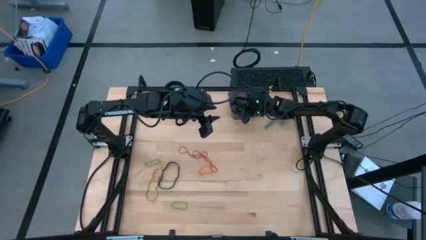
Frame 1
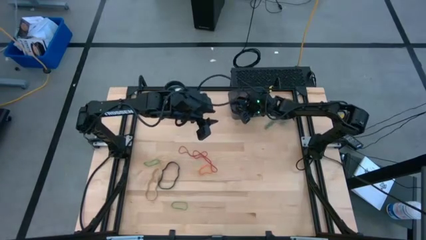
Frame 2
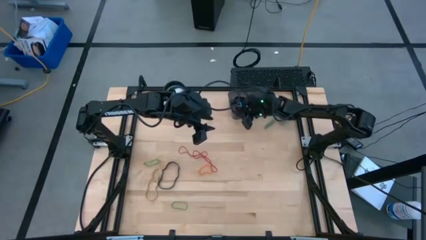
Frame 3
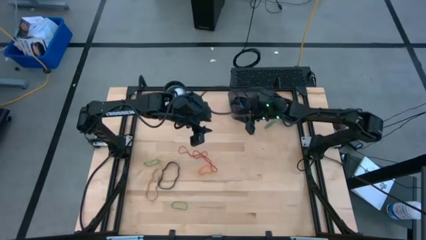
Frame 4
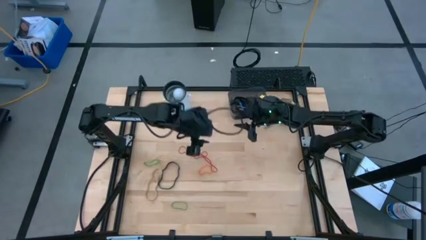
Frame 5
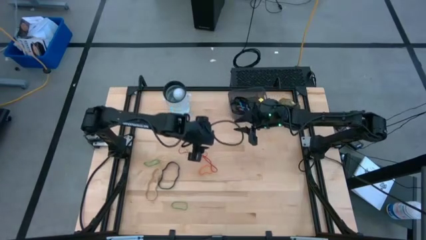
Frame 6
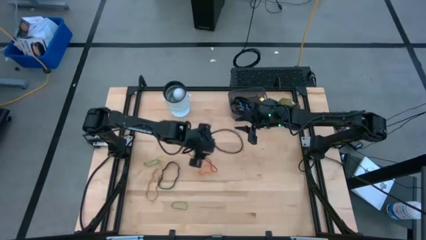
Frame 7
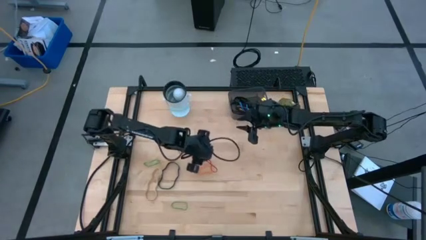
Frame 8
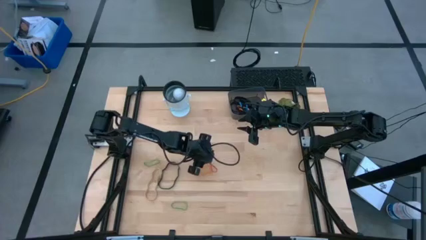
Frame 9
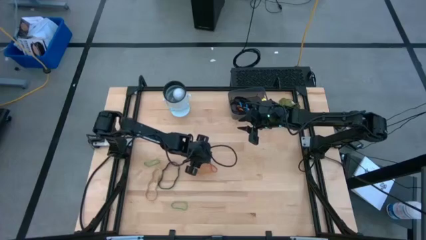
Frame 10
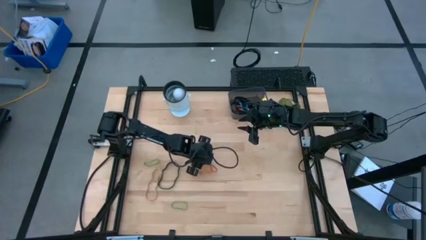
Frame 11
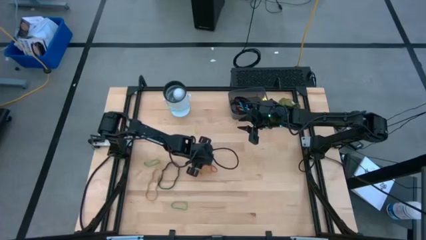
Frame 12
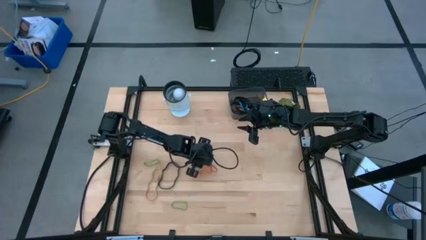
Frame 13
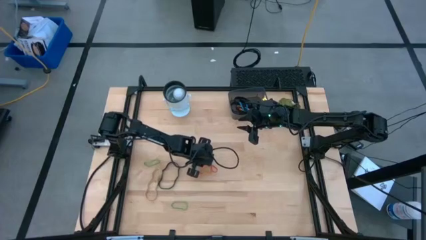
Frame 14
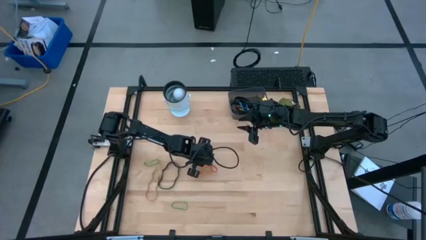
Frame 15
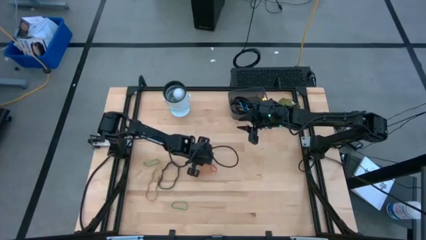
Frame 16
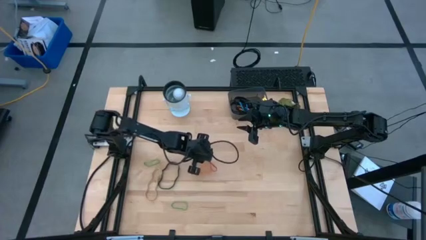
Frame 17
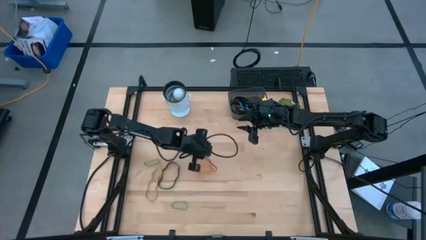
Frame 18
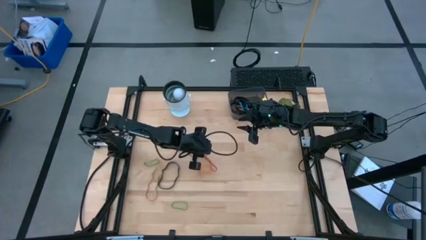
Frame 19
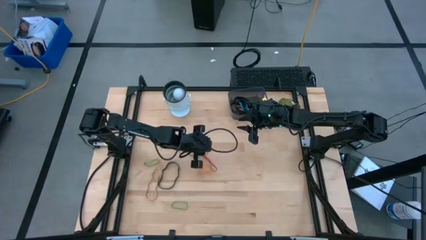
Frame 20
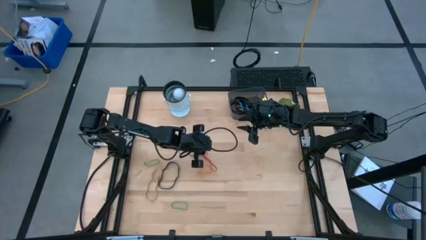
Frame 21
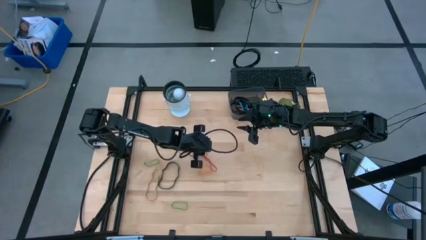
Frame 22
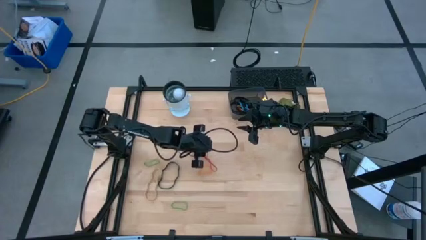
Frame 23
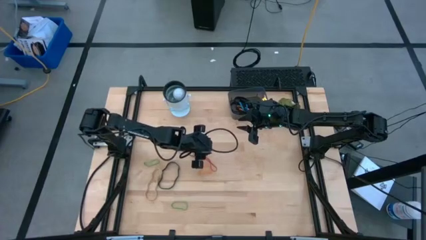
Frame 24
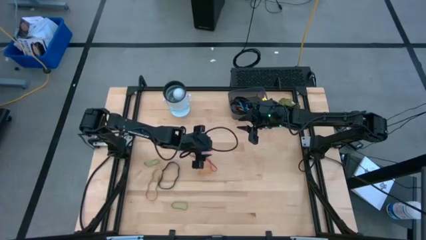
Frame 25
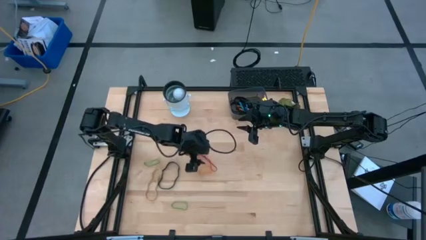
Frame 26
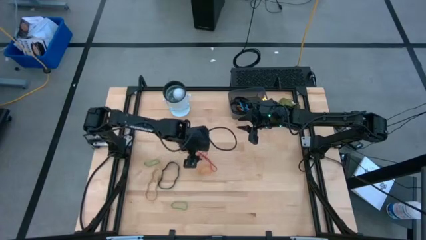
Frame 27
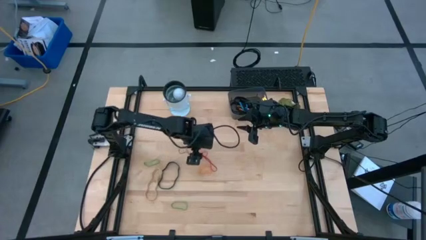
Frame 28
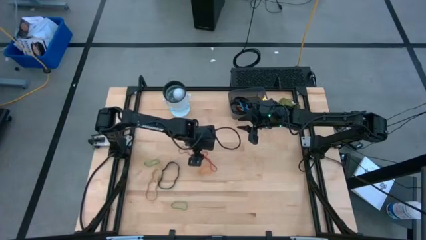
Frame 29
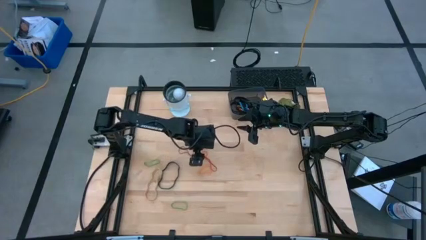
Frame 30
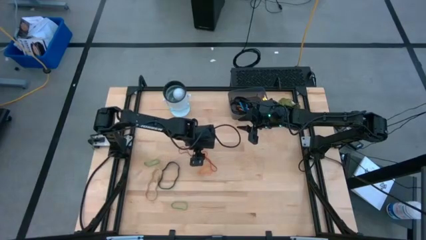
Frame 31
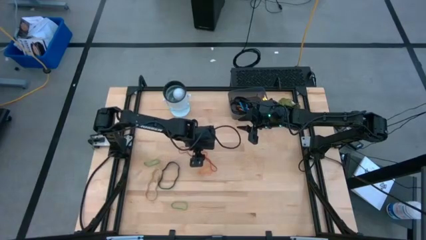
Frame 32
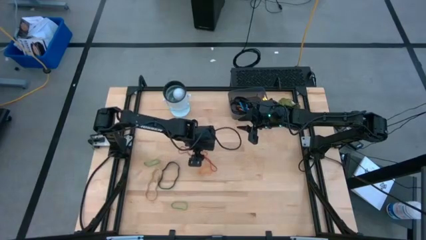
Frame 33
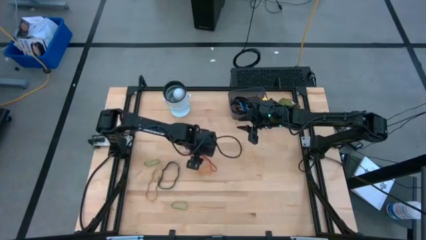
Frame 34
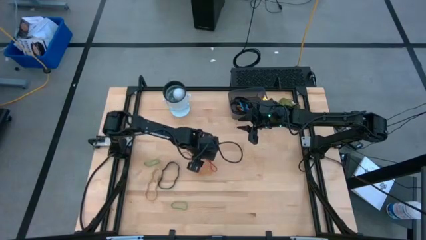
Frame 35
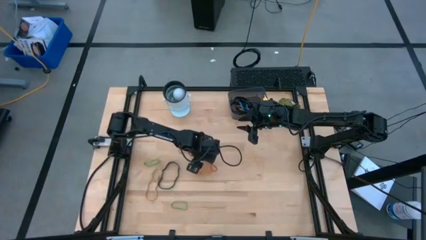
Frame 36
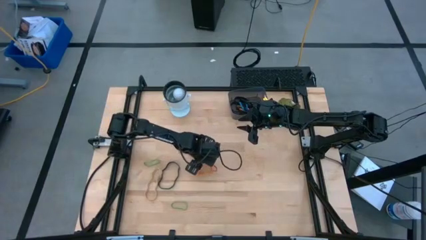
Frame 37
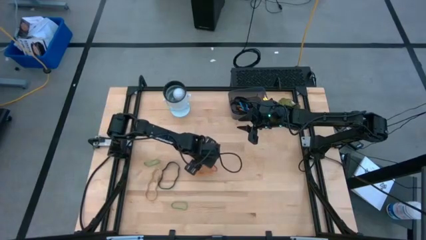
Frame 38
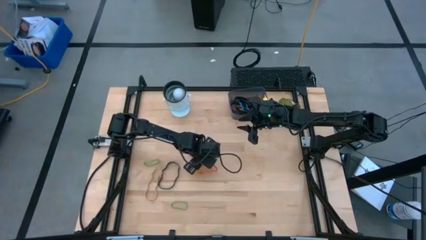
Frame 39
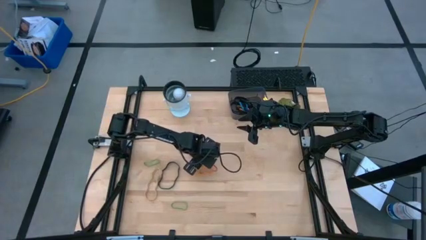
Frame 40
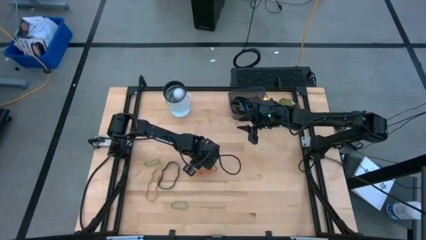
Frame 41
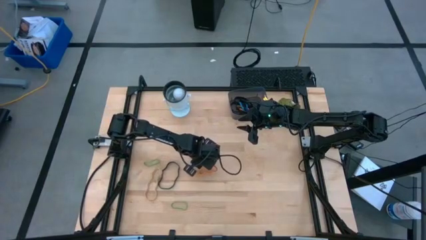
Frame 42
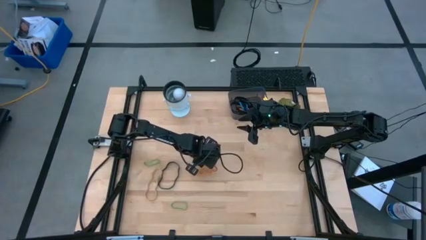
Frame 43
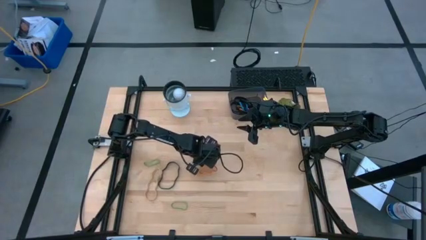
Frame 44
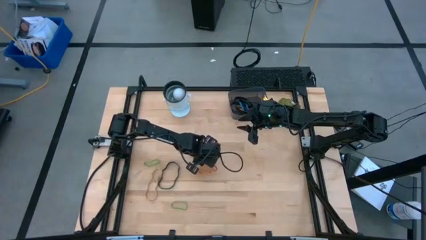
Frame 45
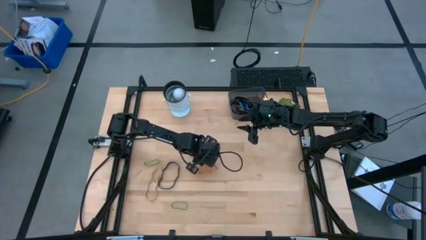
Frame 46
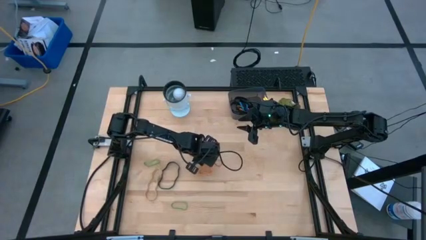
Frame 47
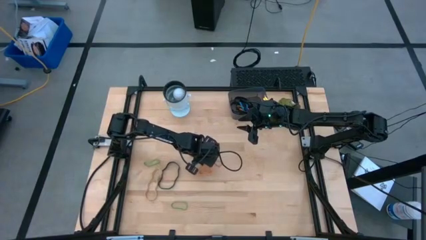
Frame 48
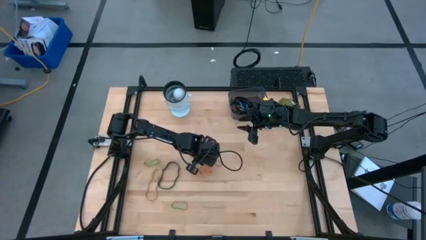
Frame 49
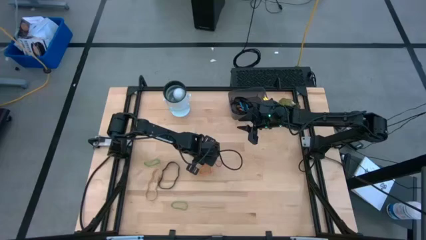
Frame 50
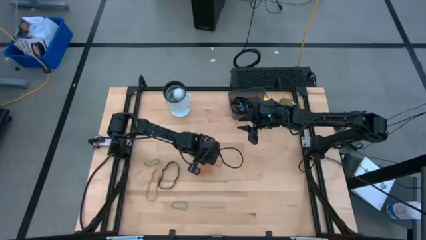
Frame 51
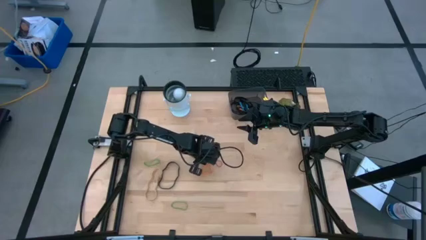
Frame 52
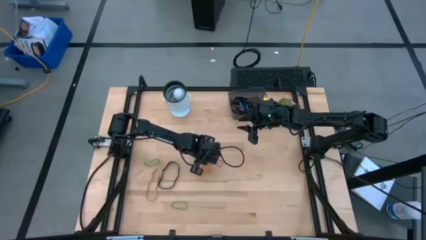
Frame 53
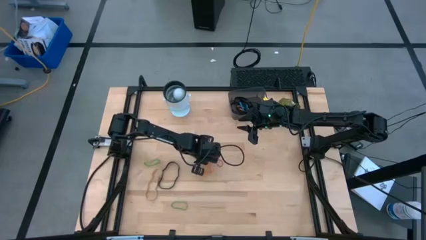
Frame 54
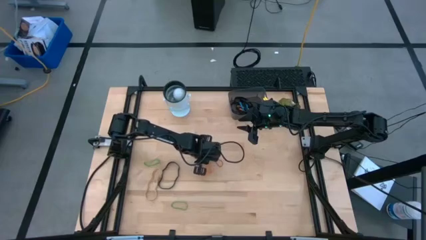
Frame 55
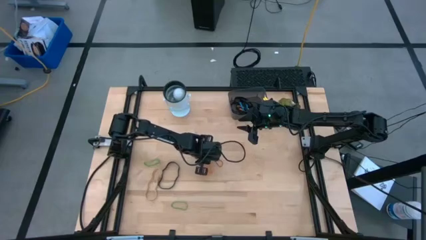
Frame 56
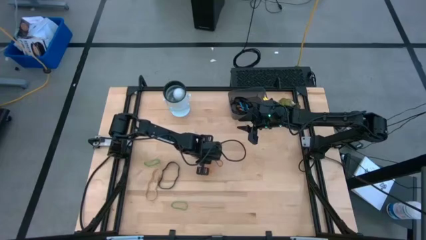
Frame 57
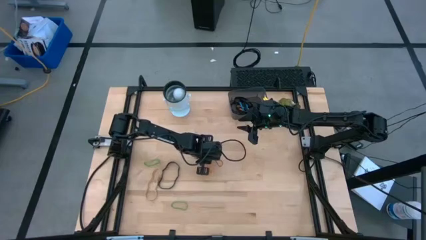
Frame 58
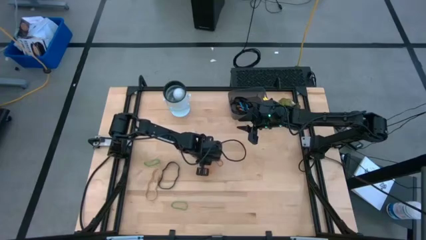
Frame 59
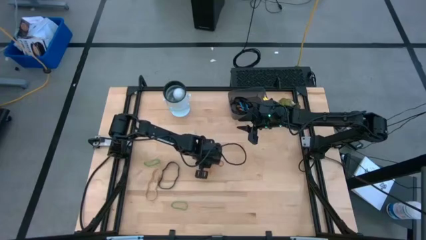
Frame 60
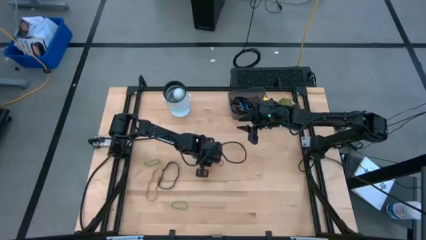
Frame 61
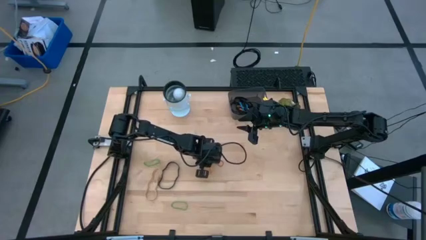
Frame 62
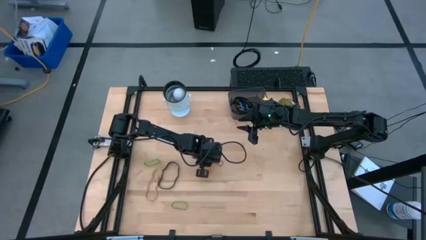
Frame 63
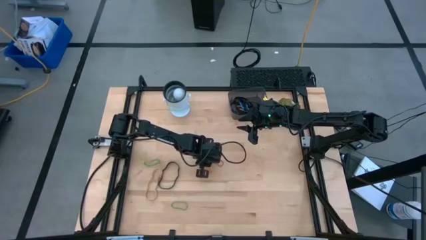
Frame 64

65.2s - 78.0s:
Task: Pick and place rubber bands into bin
Put the red rubber band into the black bin

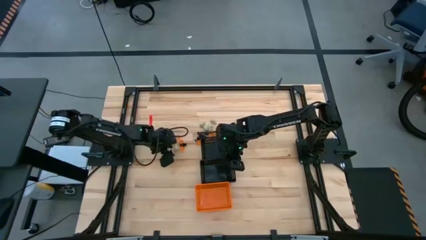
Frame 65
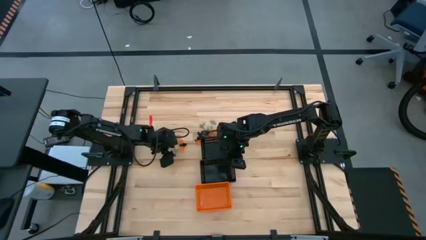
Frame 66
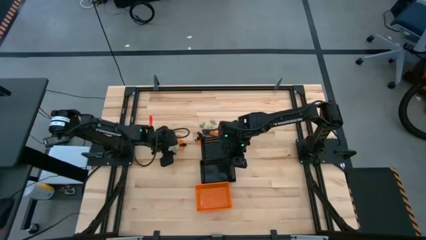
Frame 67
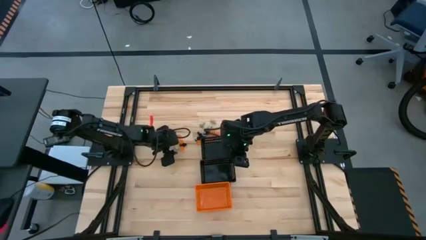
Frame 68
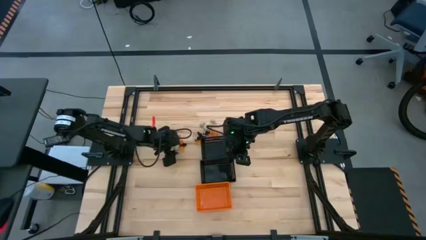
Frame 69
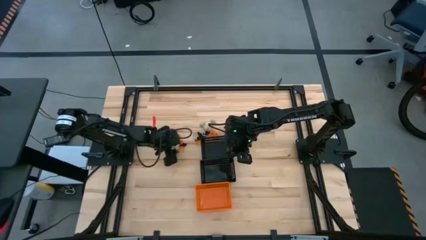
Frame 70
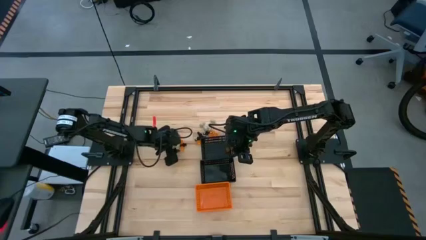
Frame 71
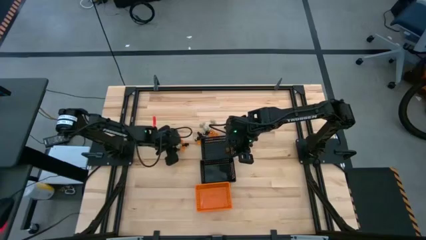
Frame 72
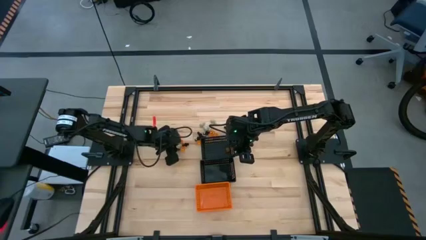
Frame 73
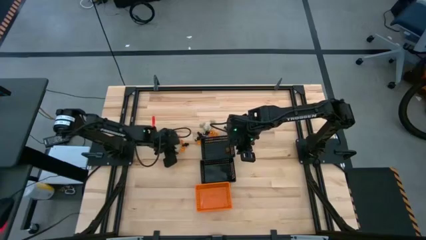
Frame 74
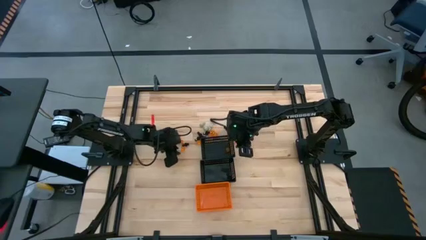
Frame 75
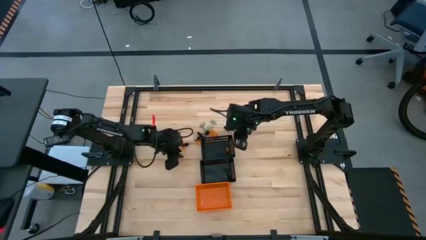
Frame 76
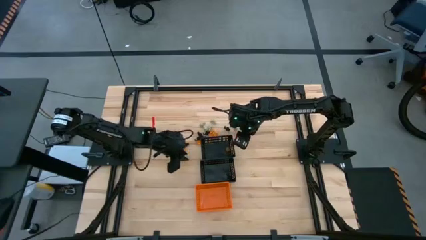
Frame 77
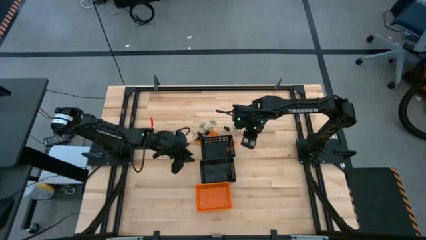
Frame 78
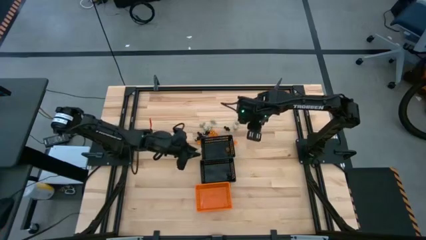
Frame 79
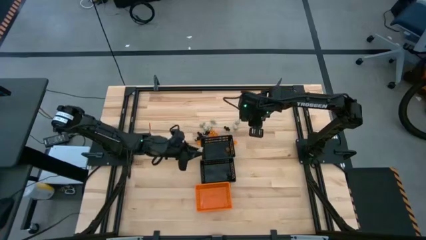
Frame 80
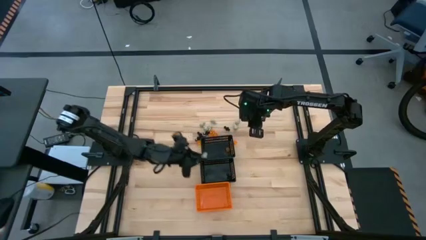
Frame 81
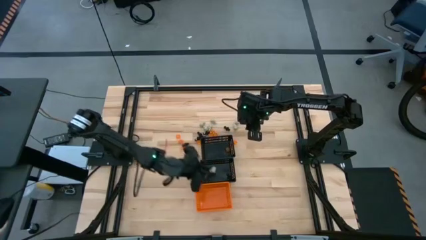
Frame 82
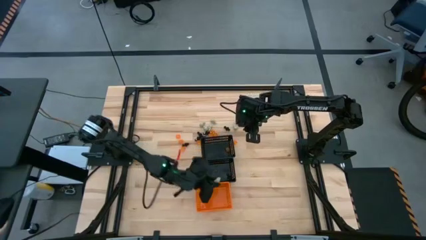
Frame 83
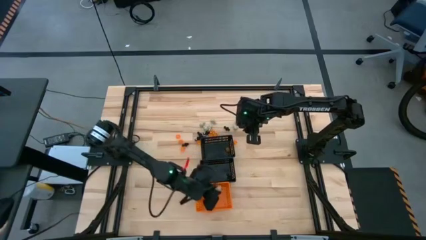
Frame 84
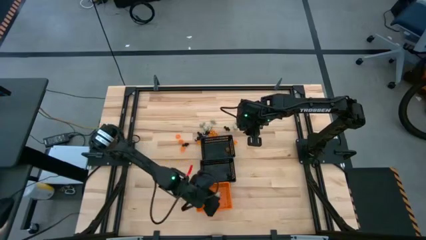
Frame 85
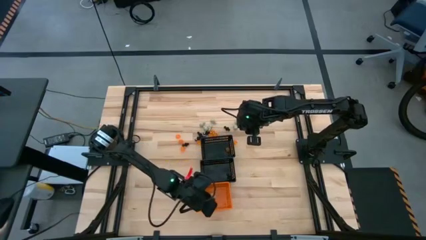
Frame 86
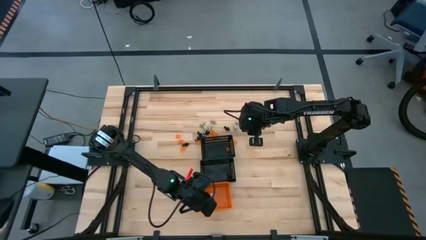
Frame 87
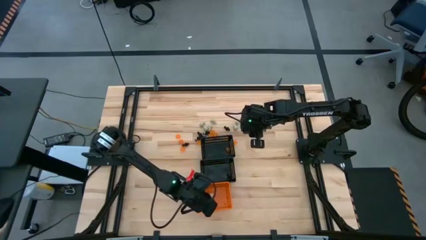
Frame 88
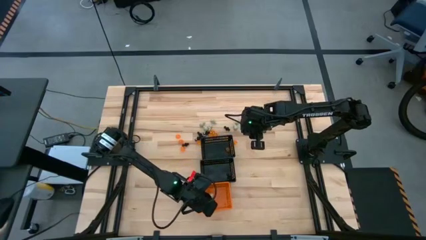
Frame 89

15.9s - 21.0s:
Task: Sort Halloween decoration
Put the white skull toy into the orange bin
